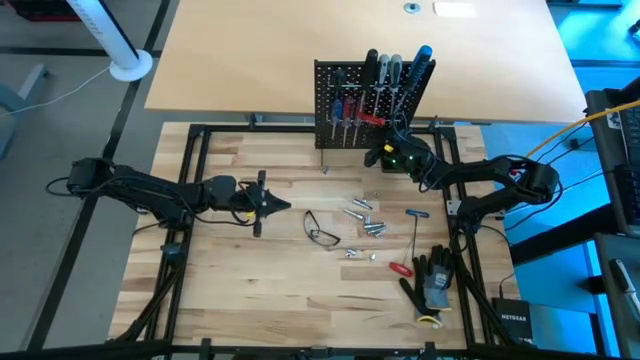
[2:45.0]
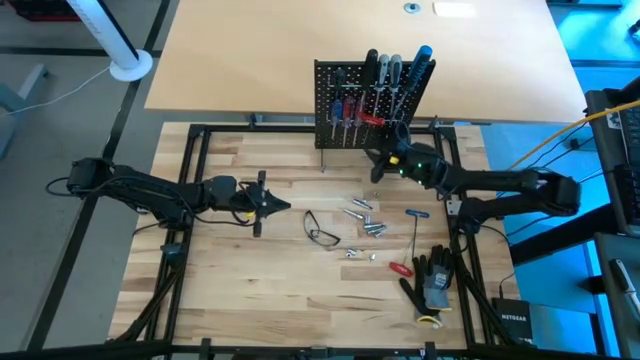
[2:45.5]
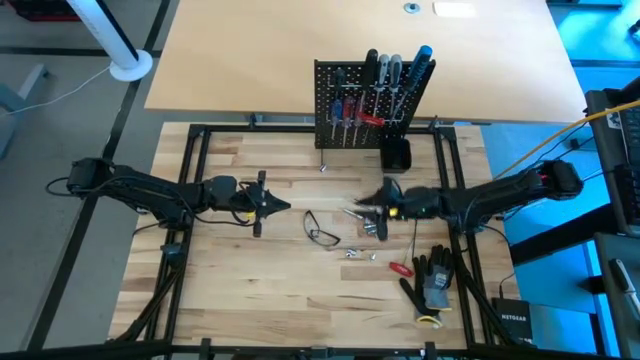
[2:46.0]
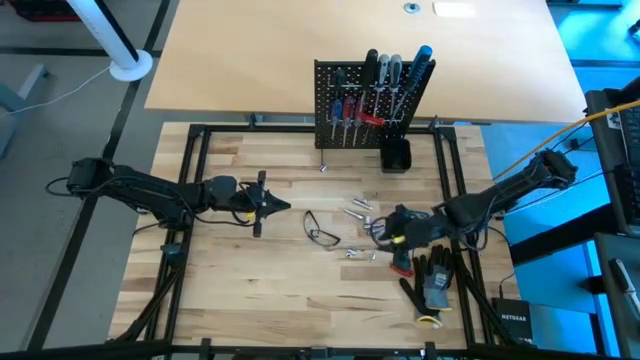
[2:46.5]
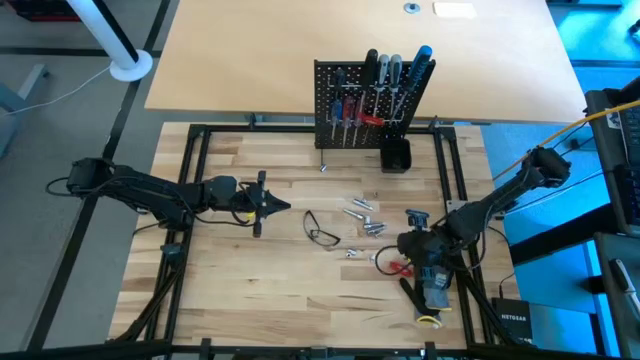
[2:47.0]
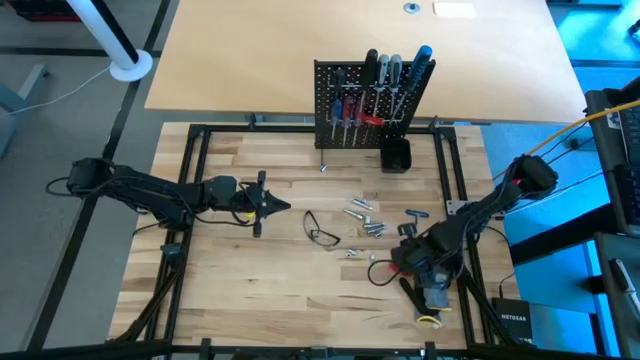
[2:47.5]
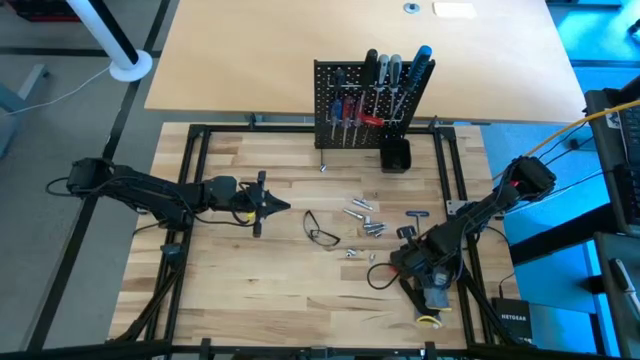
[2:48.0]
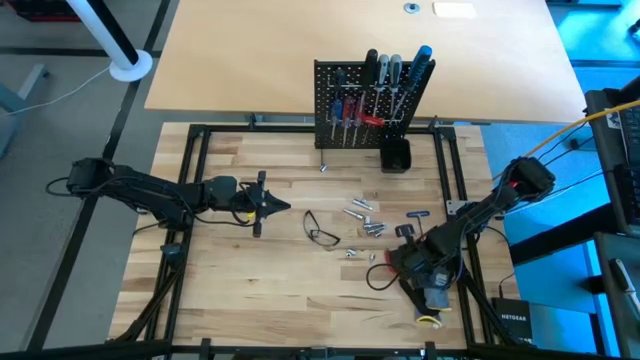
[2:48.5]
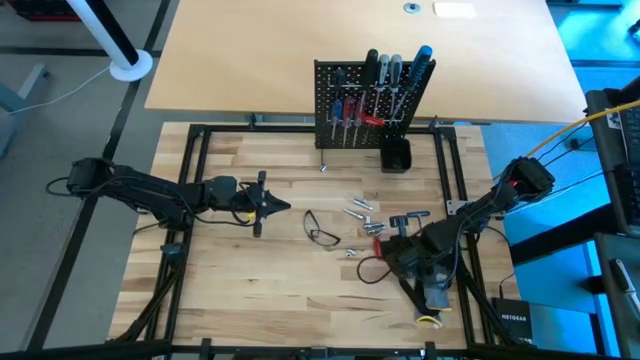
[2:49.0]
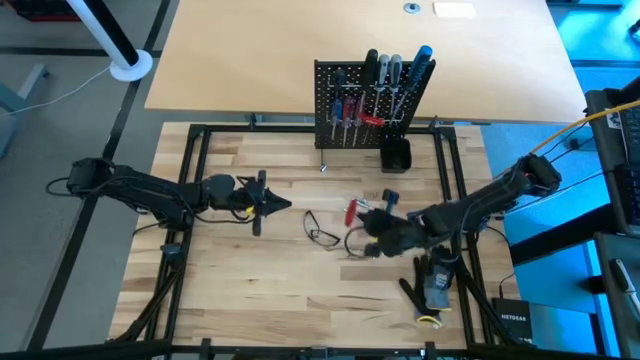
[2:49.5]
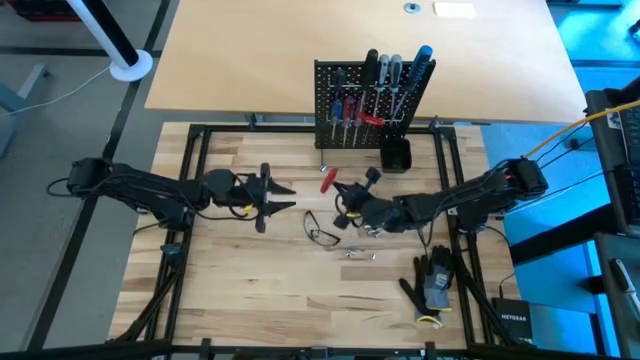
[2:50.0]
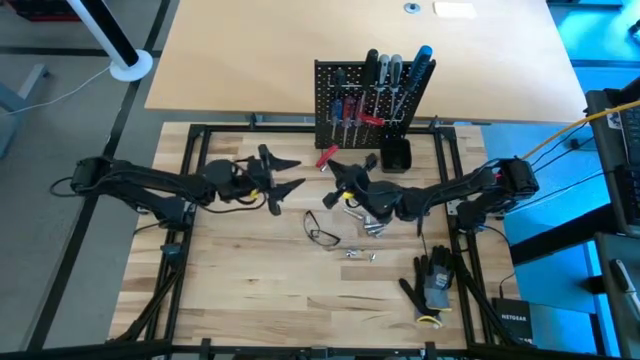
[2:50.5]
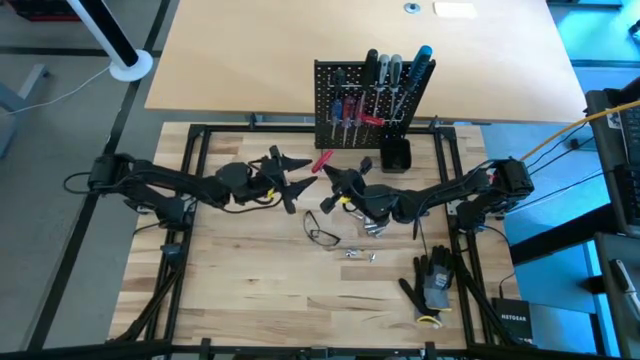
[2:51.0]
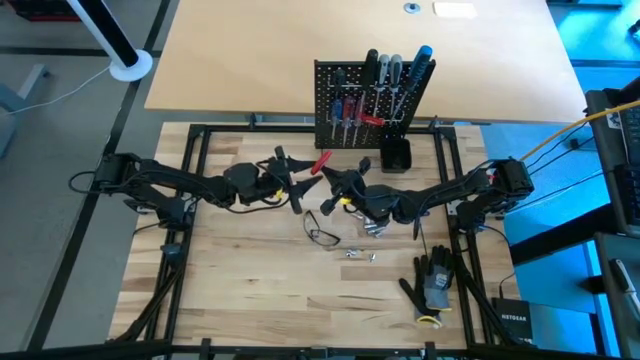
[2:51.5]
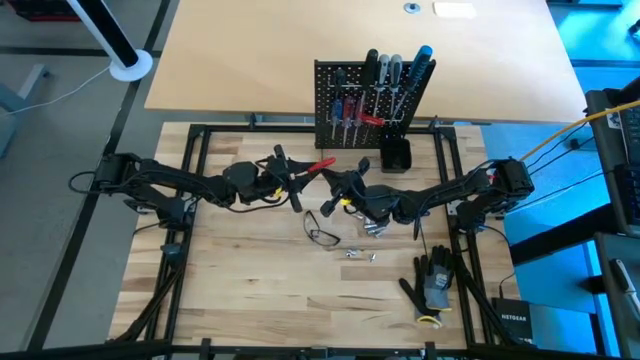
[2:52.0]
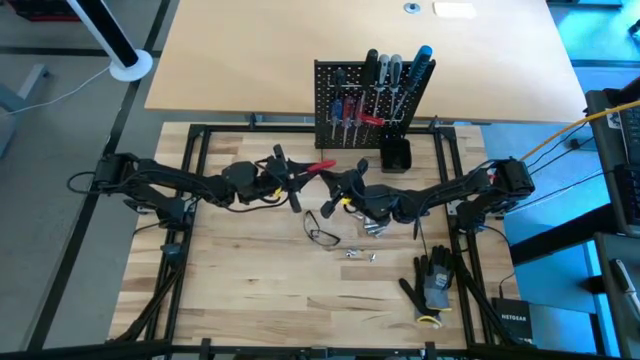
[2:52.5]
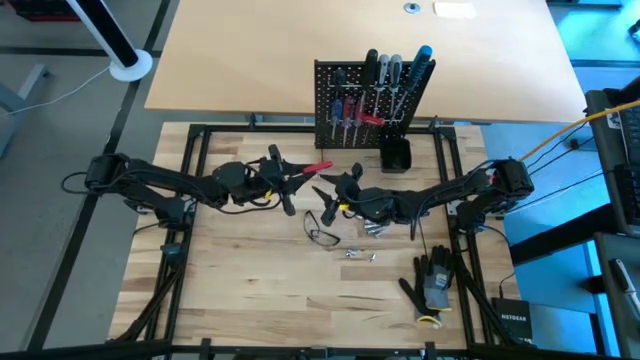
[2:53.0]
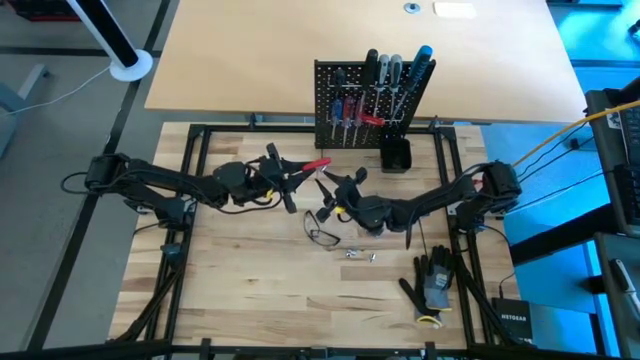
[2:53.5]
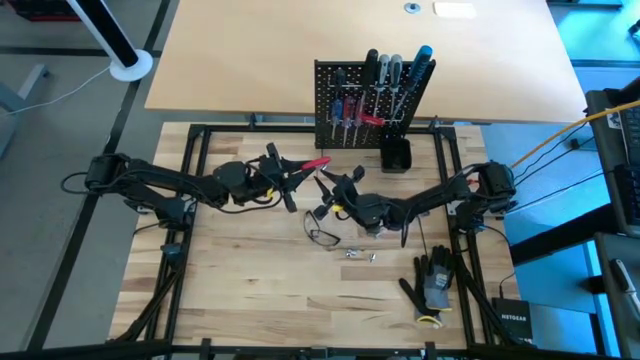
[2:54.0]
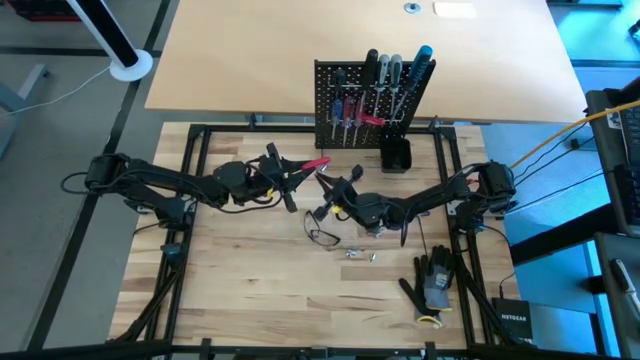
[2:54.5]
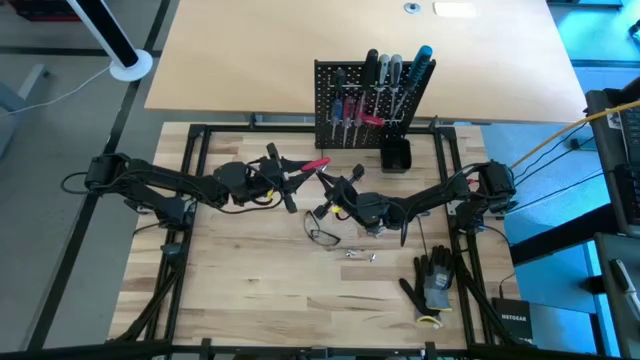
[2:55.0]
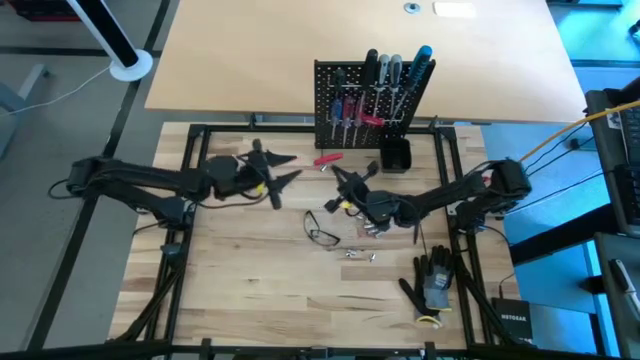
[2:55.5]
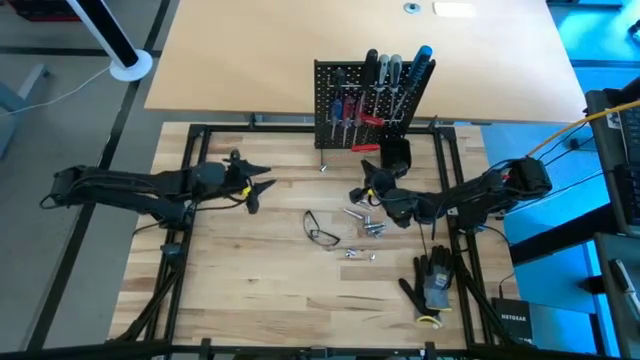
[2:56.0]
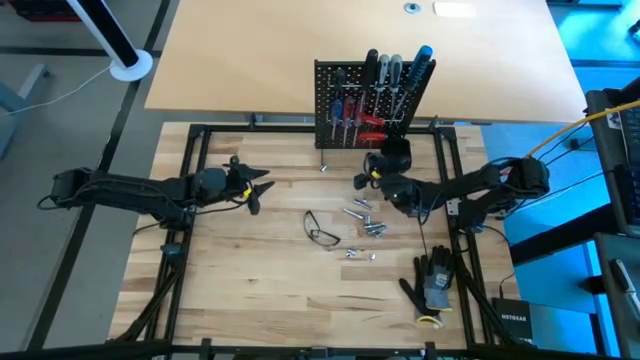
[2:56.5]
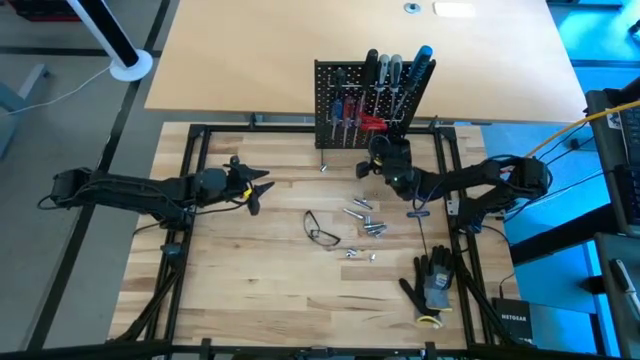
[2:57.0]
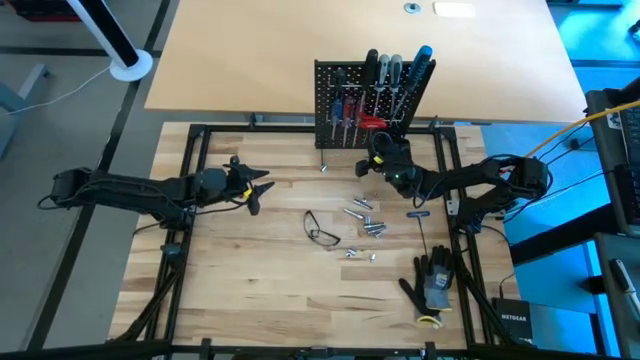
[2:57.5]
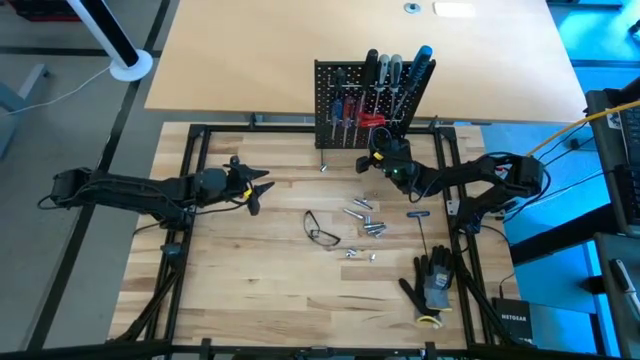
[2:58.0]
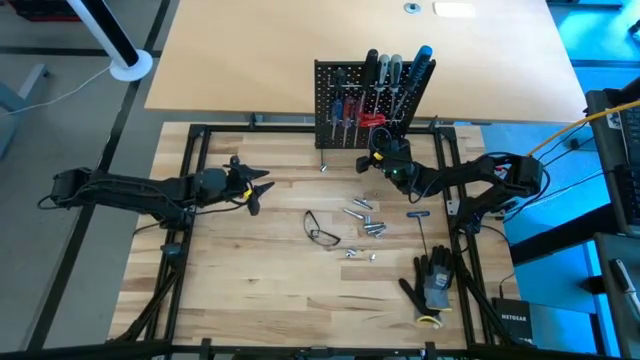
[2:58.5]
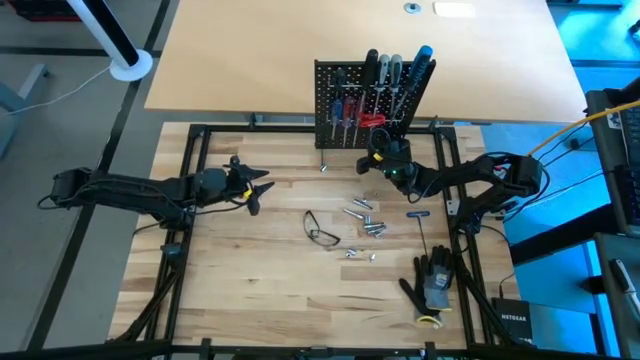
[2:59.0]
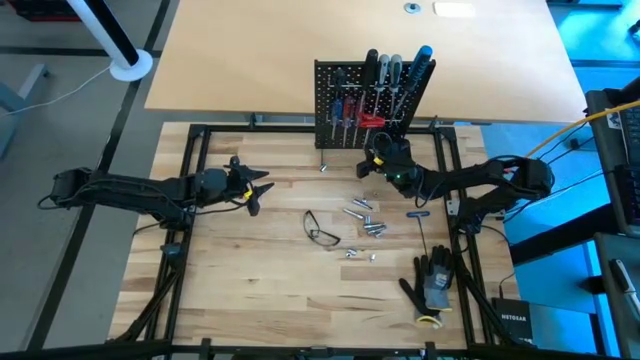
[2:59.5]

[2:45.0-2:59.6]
Task: Hang tools onto peg board
Hang the red allen wrench on the peg board

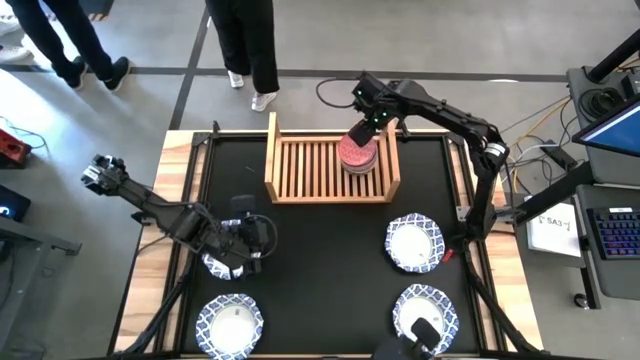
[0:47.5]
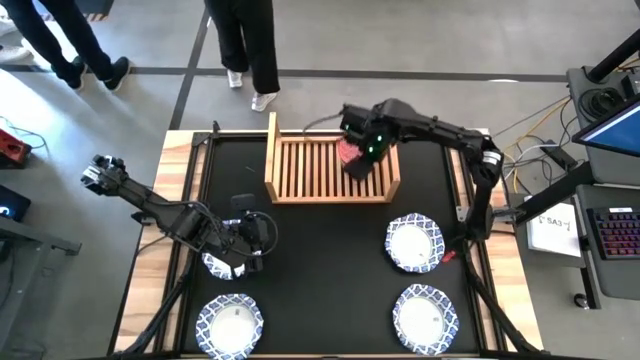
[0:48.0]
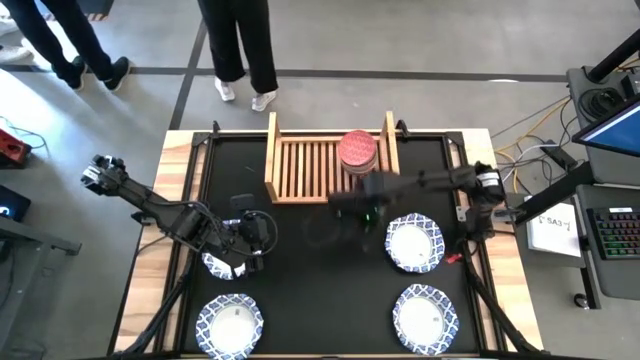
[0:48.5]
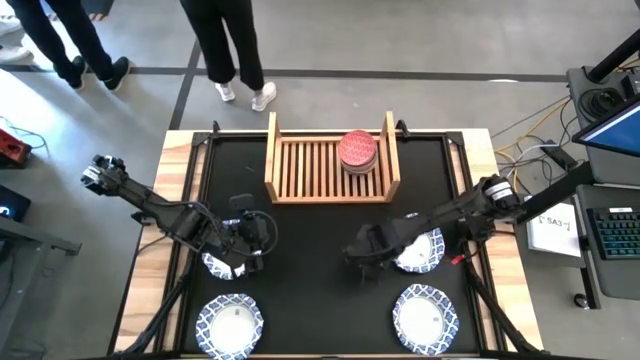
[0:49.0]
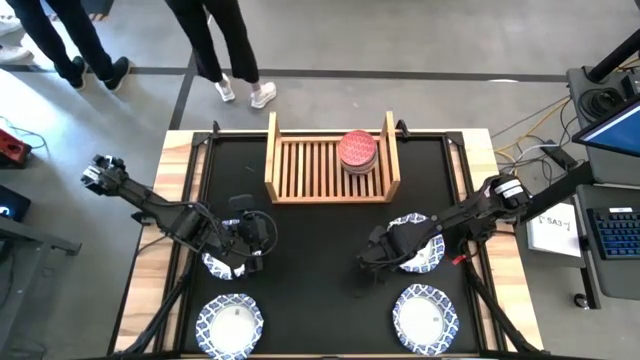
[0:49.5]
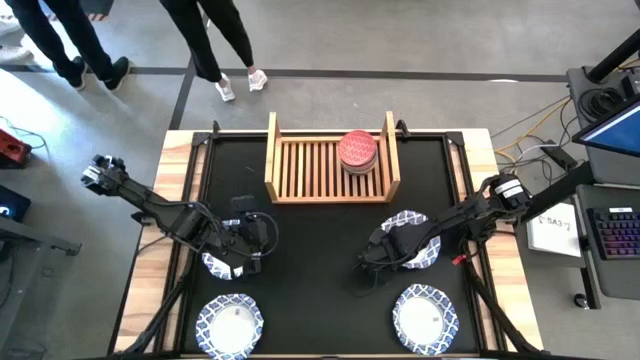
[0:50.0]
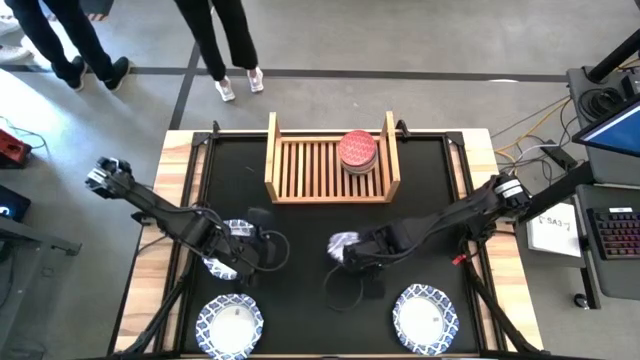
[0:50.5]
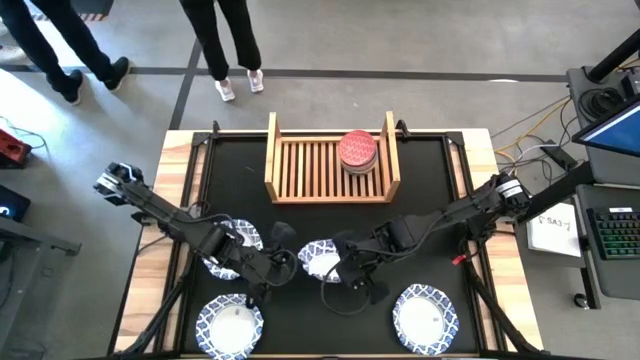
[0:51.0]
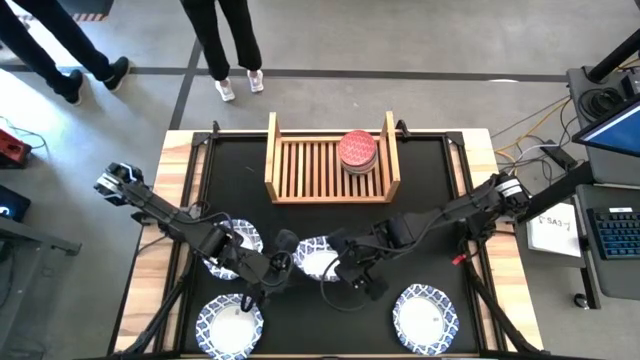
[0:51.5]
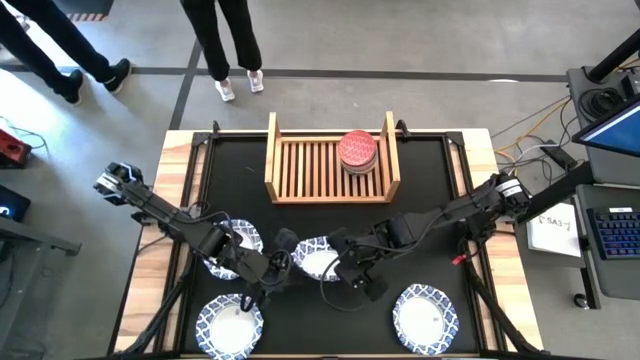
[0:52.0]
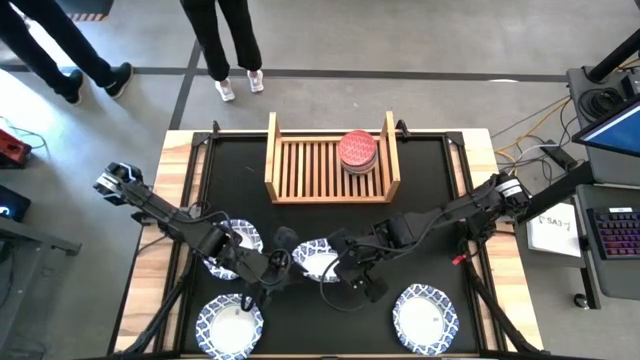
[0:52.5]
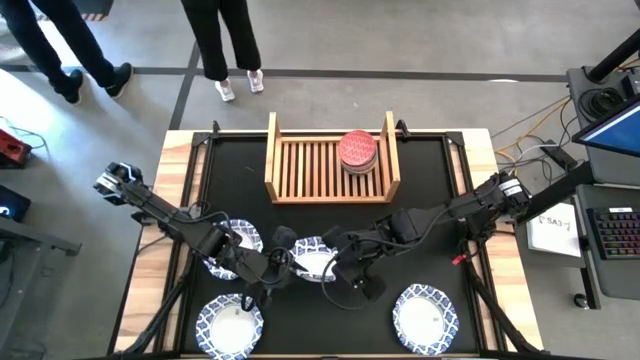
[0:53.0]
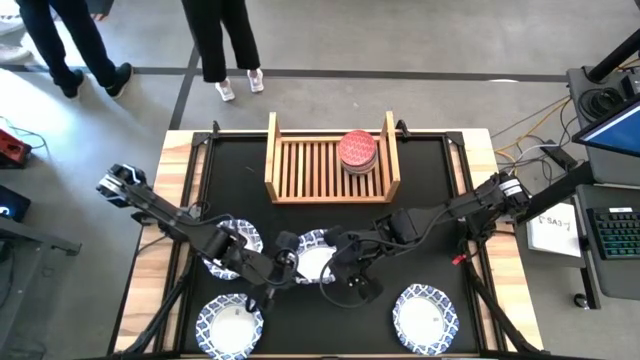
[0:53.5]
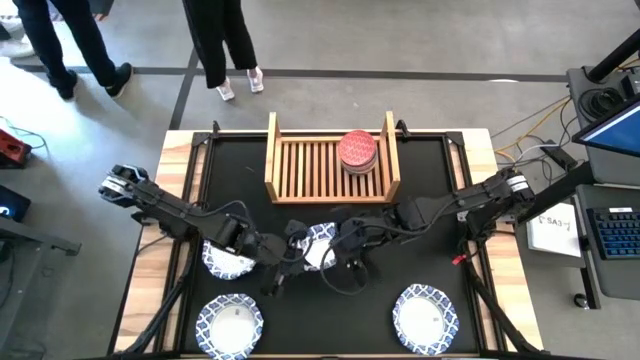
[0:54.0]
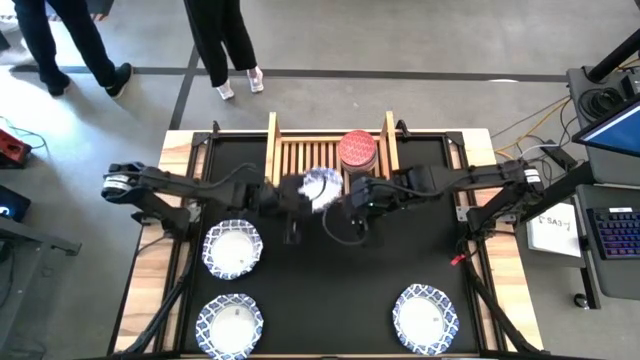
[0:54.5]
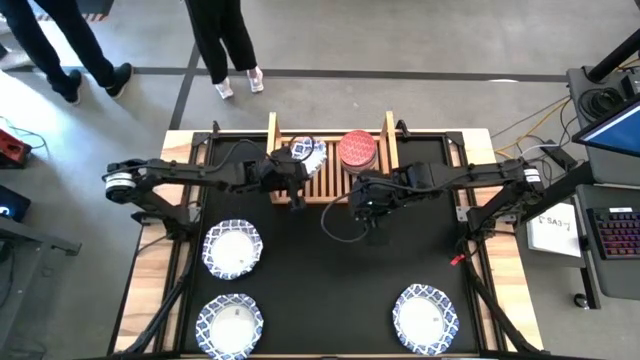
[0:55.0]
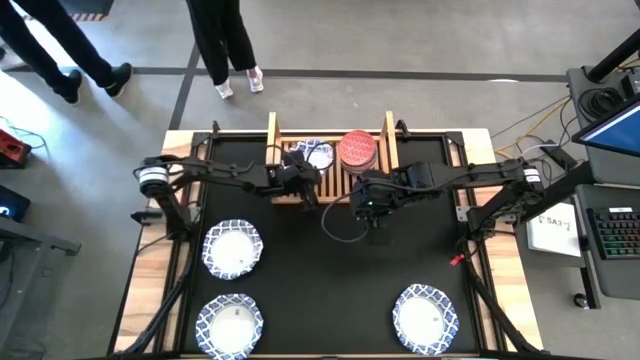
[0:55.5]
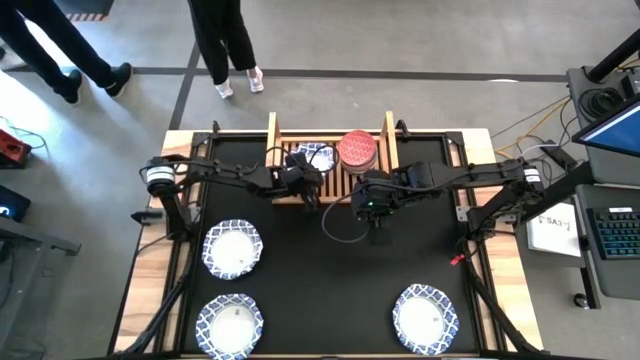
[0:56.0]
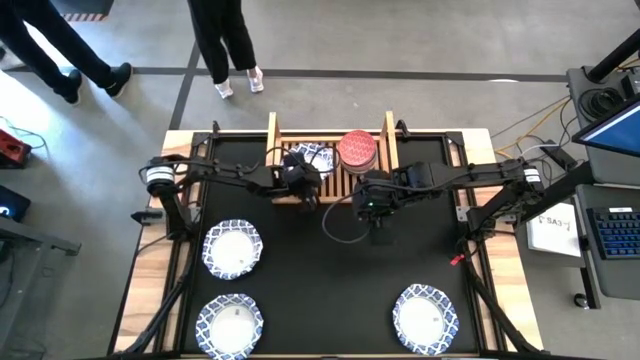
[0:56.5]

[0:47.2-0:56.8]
Task: Place and stack bowls onto a shelf
Put the white blue patterned bowl on the shelf
